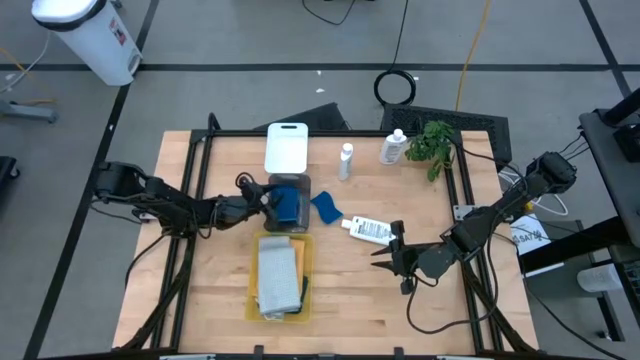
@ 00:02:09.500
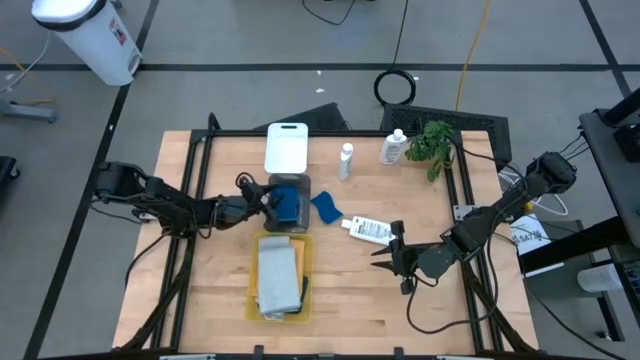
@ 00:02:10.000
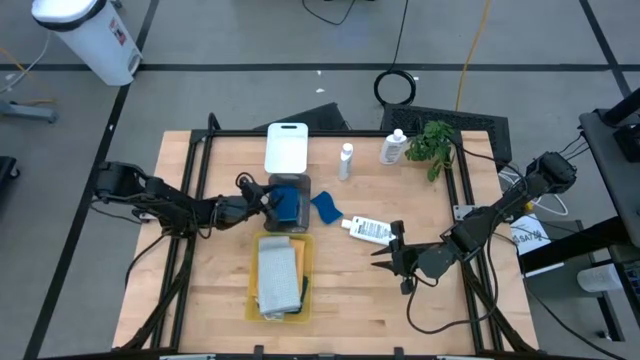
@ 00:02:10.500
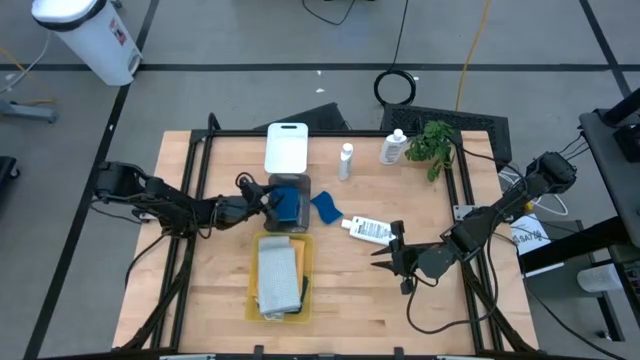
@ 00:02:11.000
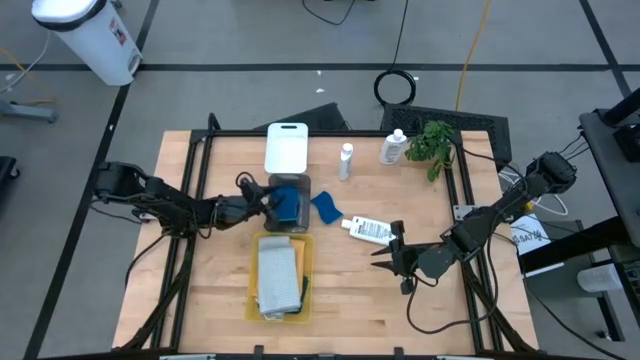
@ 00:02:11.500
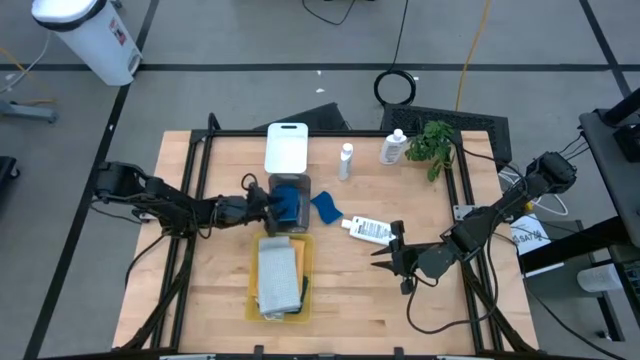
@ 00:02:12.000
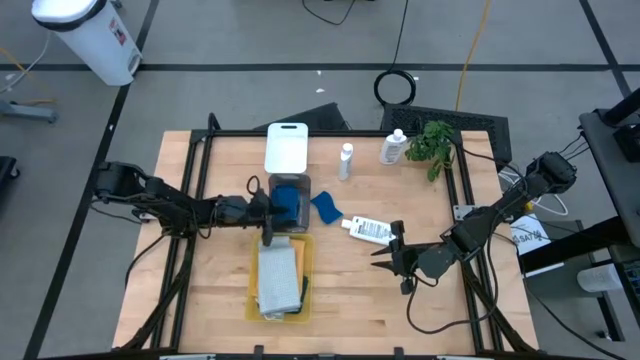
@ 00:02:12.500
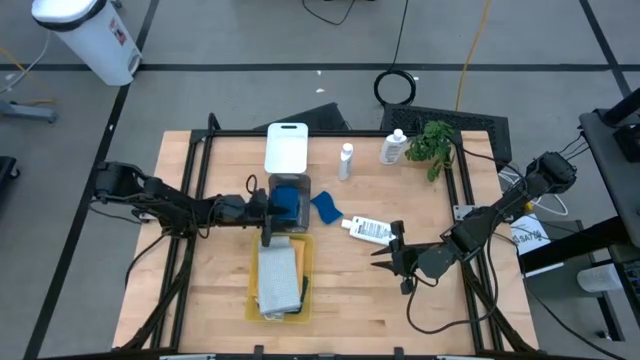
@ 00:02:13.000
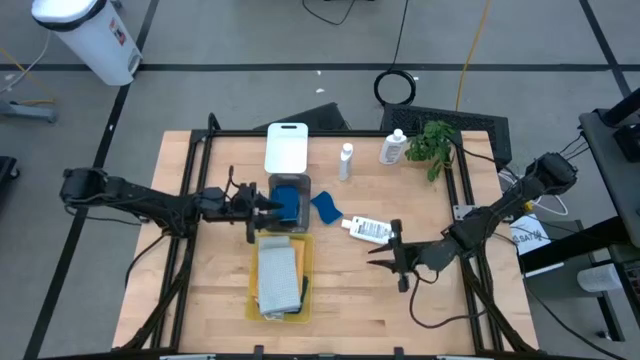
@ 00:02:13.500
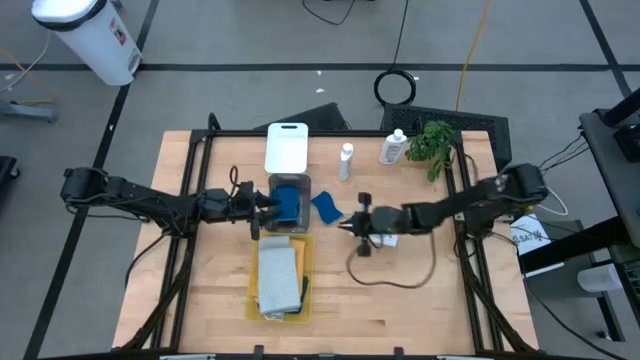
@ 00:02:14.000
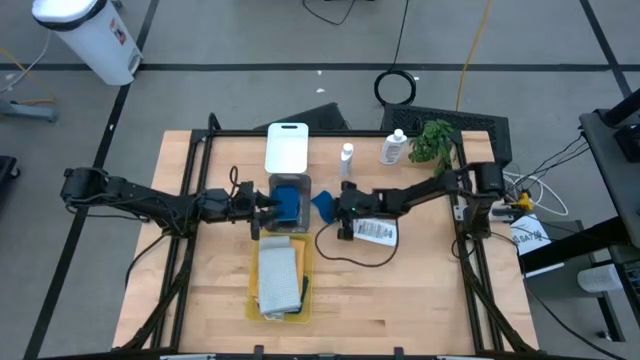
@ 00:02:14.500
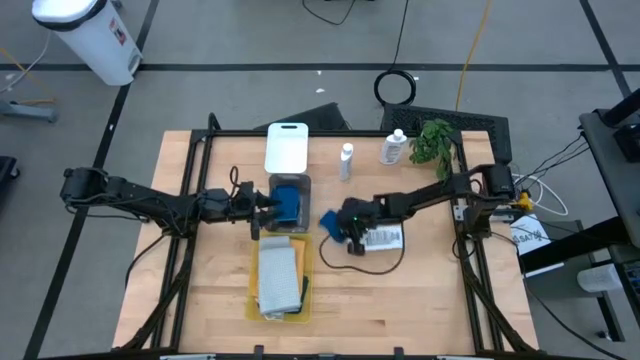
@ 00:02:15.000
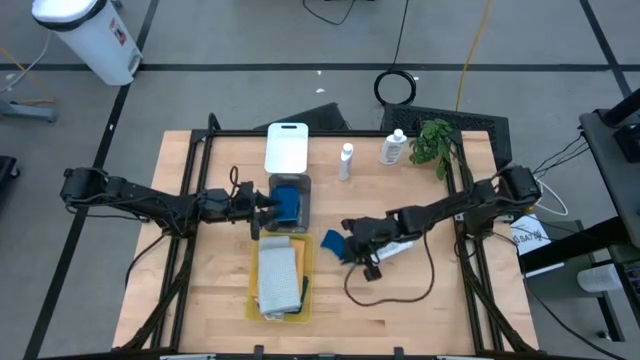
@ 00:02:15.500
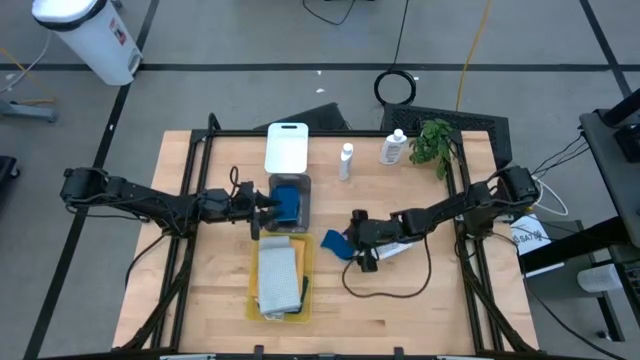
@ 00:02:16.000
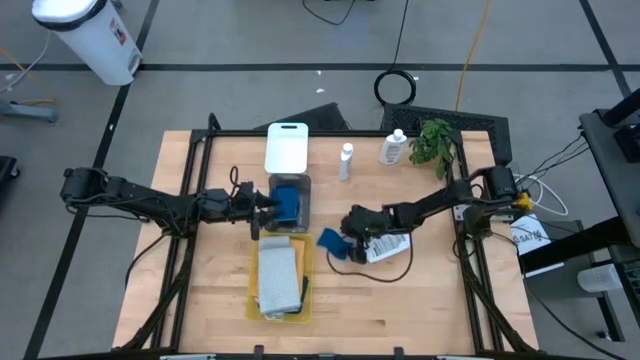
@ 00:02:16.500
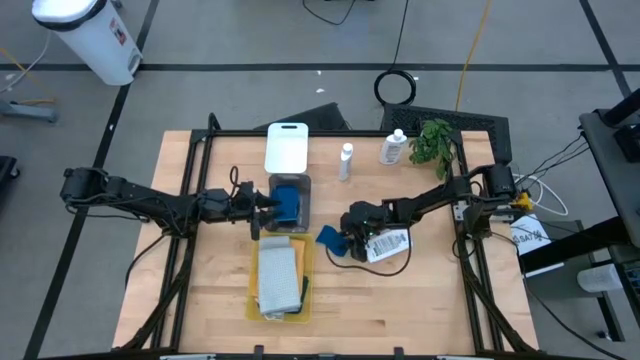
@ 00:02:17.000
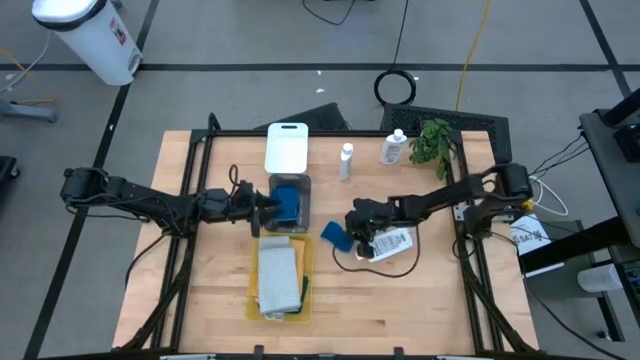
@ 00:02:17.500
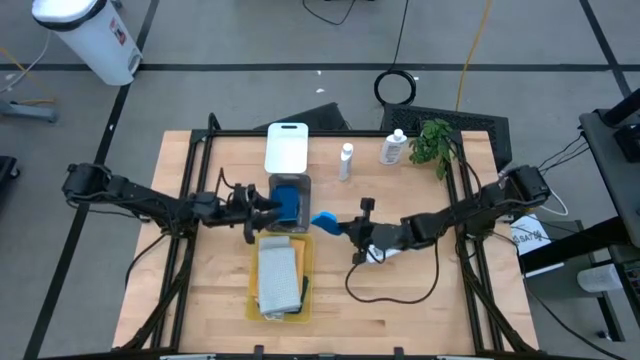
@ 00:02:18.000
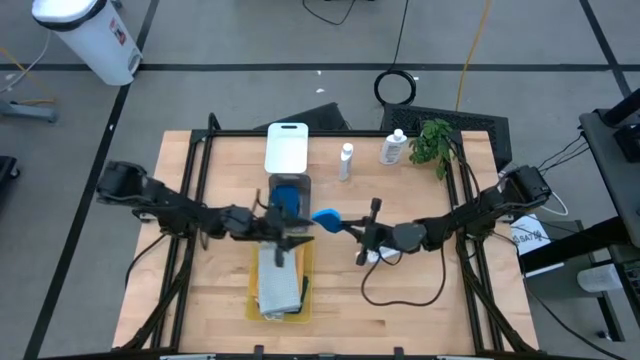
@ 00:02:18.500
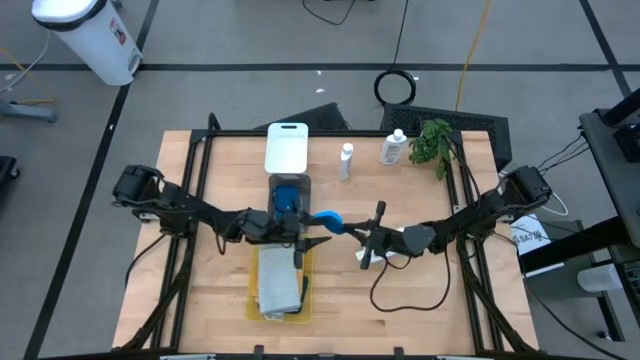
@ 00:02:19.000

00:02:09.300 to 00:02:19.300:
Task: Pick & Place Kitchen Items
Put the blue sponge into the black bin

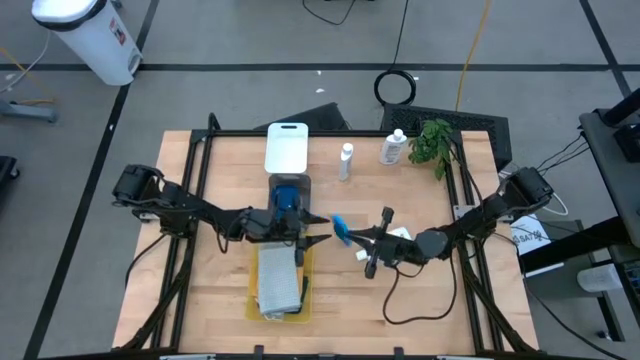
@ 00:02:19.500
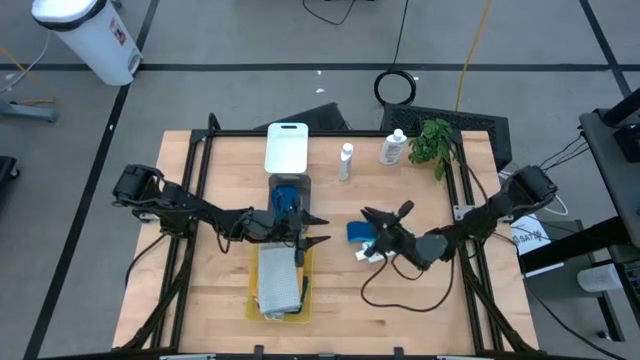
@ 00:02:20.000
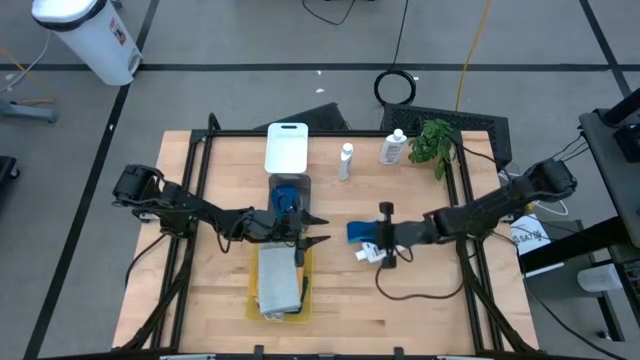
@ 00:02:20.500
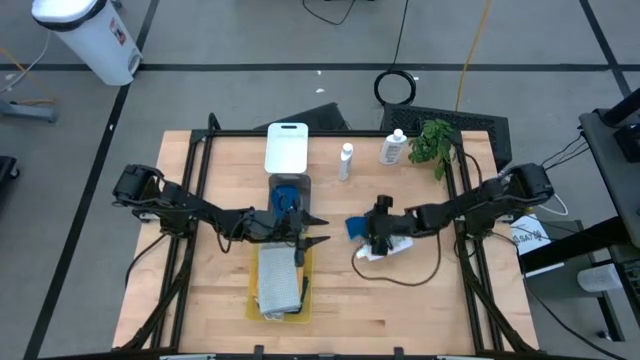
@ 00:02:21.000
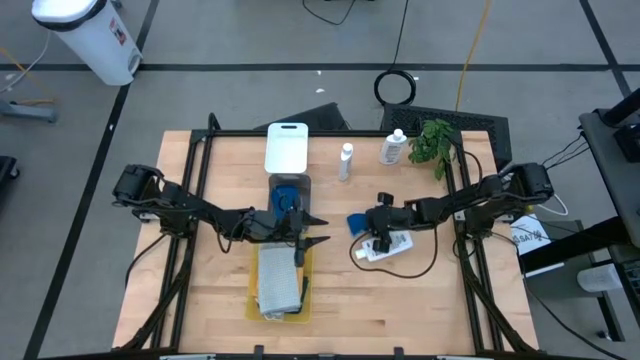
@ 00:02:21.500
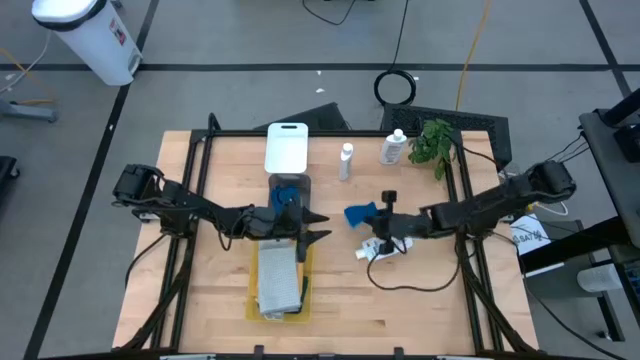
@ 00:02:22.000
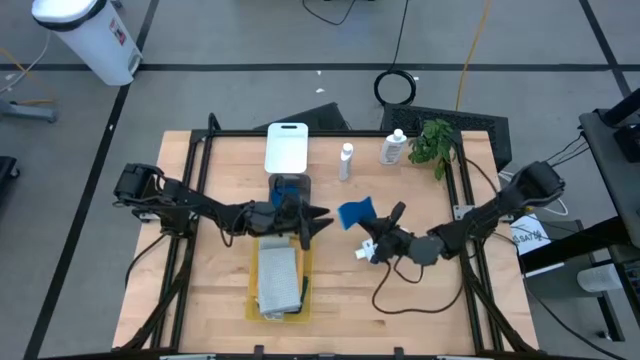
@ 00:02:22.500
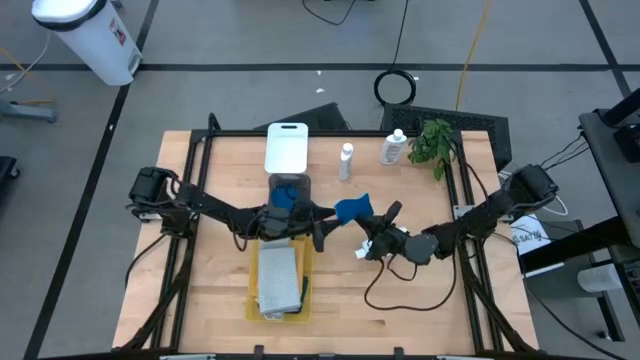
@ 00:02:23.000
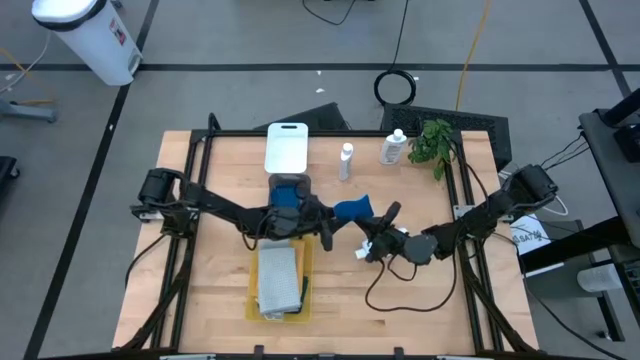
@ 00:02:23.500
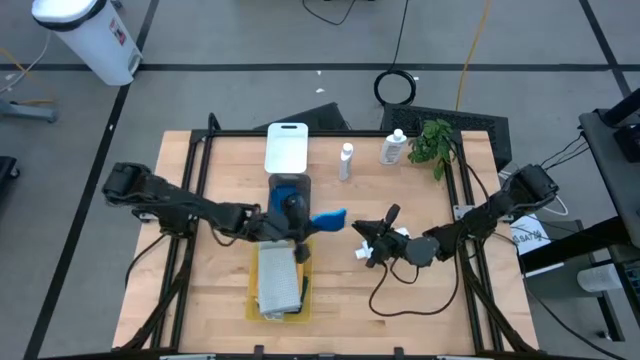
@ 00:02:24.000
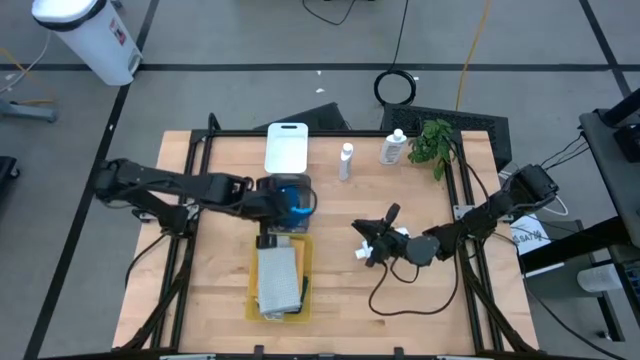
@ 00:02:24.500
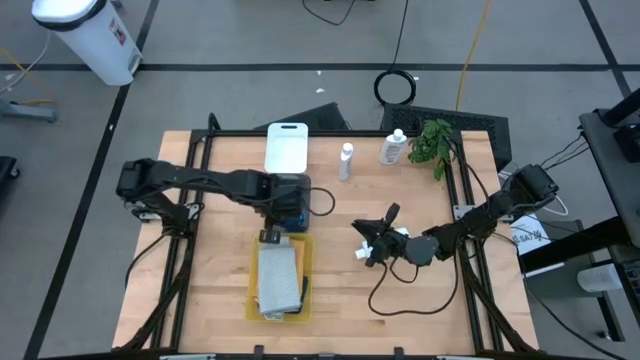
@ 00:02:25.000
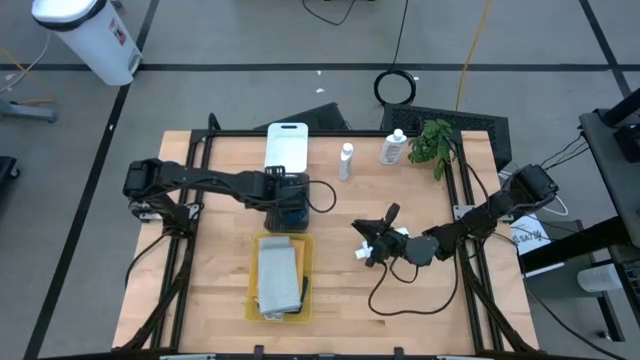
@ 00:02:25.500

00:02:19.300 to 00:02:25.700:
Put the blue sponge into the black bin

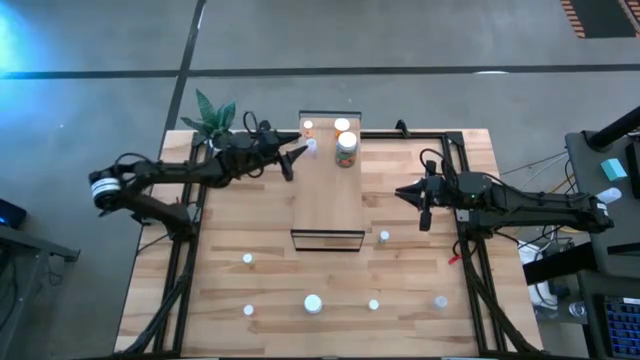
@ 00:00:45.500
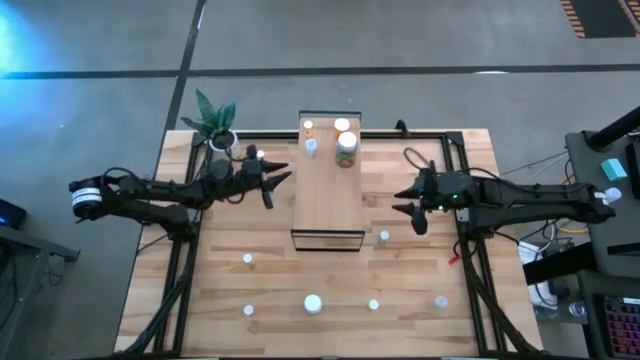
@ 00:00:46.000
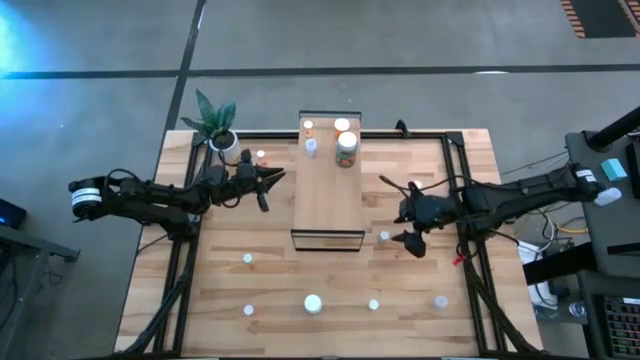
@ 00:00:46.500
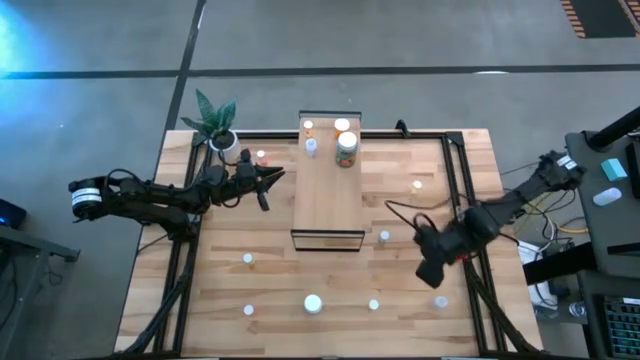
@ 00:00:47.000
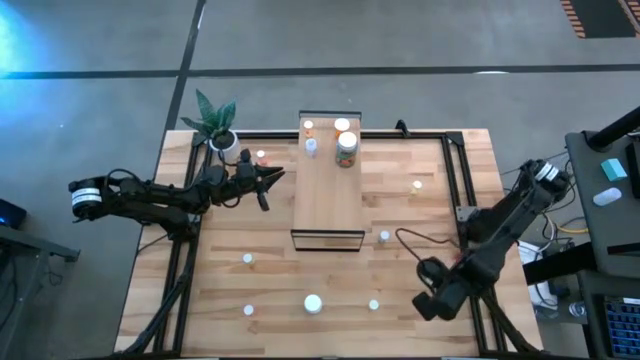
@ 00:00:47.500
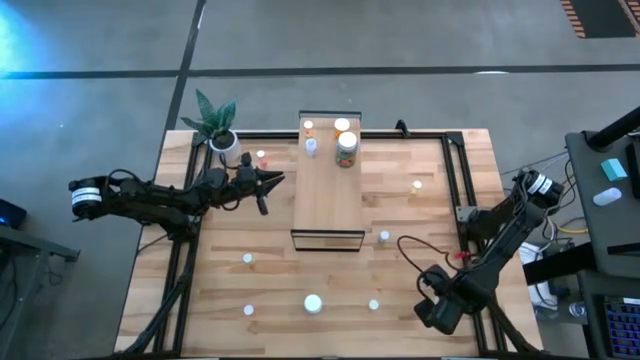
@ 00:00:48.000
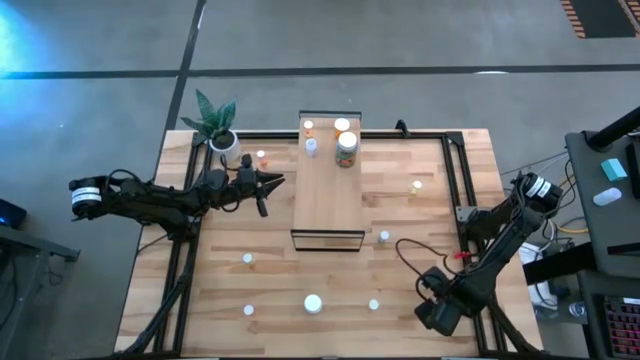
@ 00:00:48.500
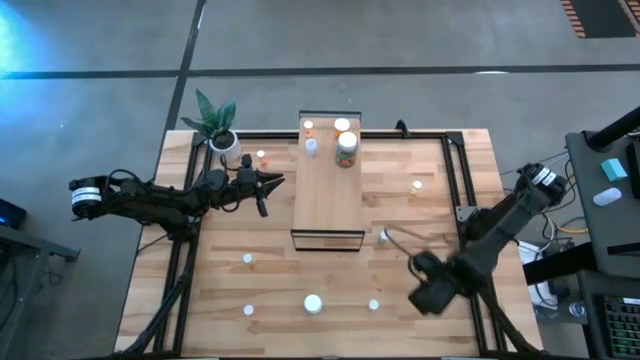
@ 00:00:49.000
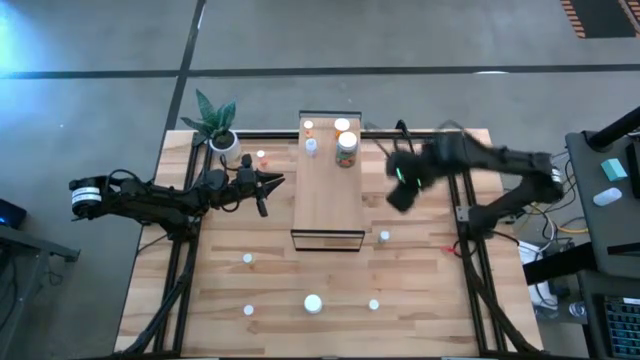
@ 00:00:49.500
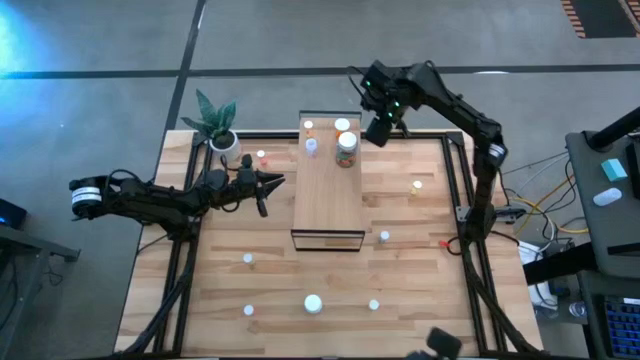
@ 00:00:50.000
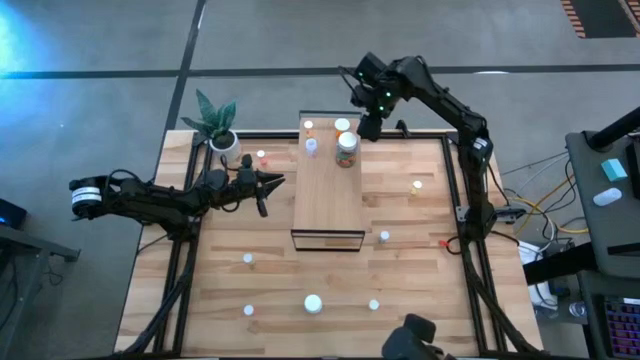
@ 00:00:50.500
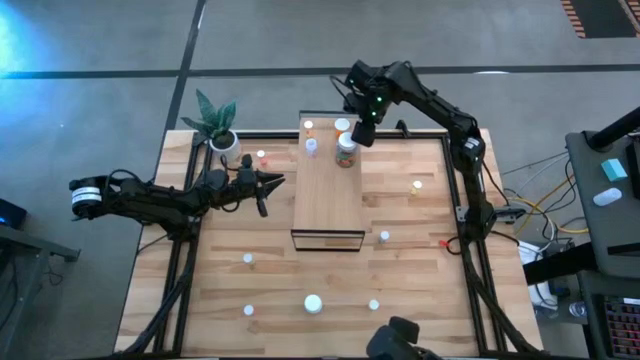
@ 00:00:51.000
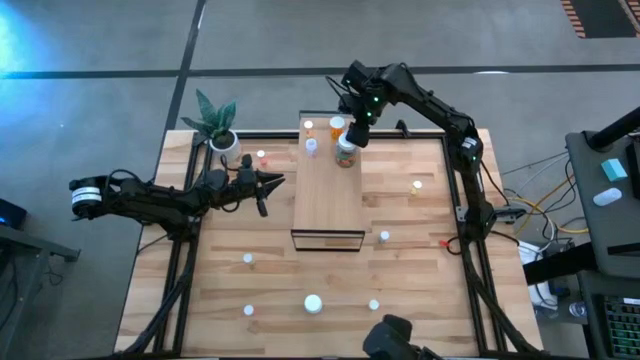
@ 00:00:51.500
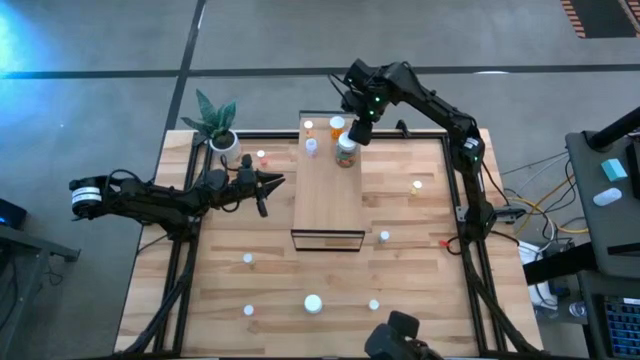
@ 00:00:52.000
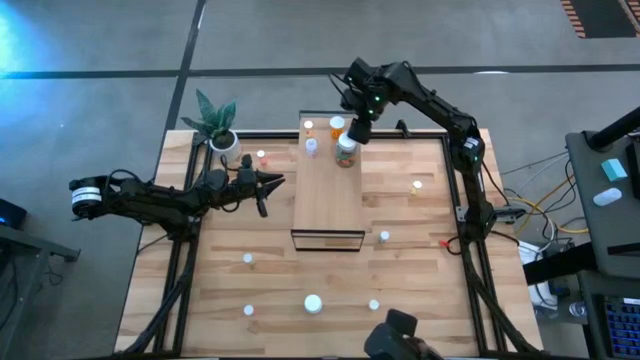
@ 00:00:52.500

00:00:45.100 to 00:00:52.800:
Task: Pick and place medicine bottles onto shelf by color
Put the transparent pill bottle on the shelf
